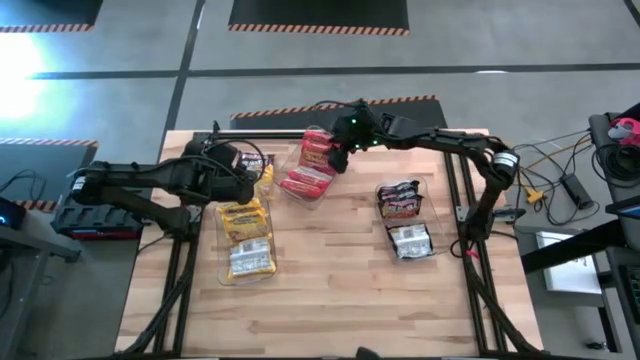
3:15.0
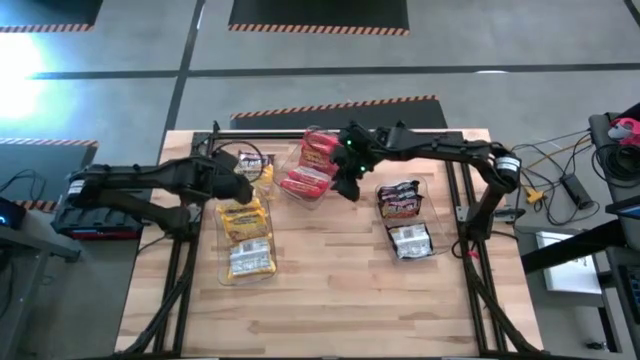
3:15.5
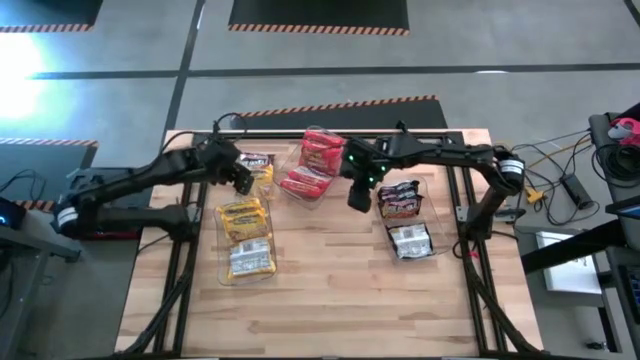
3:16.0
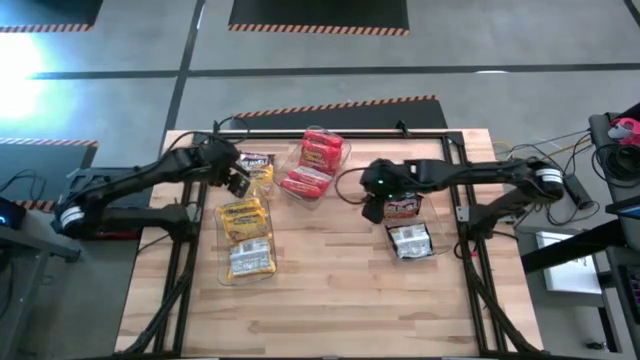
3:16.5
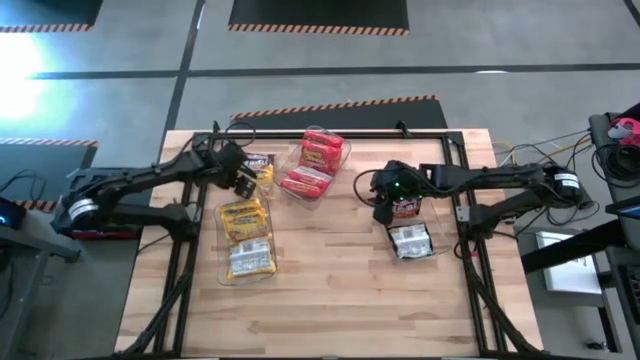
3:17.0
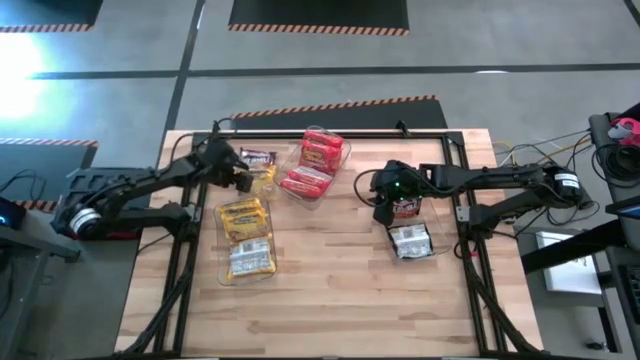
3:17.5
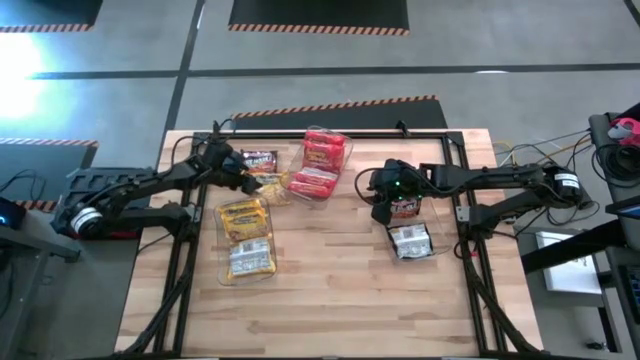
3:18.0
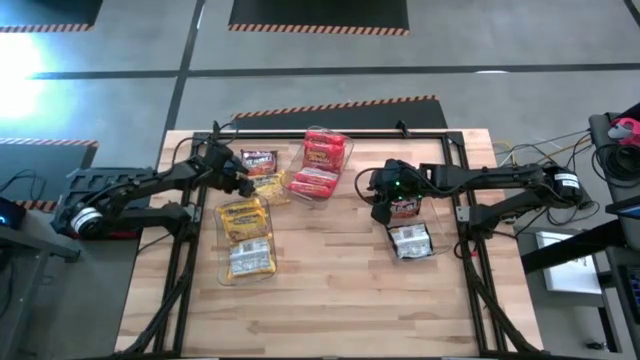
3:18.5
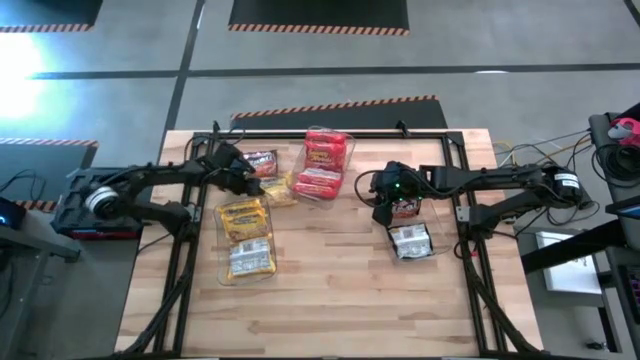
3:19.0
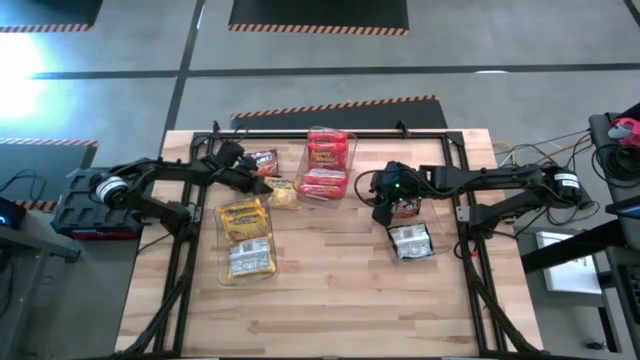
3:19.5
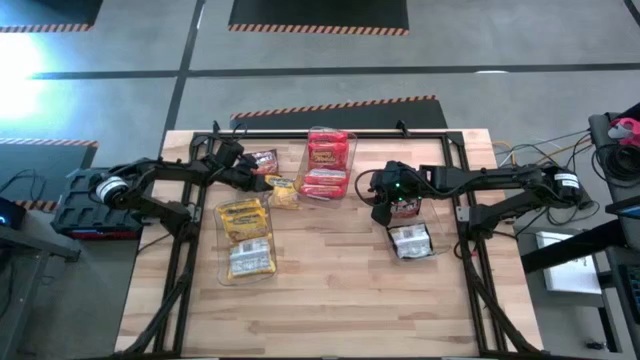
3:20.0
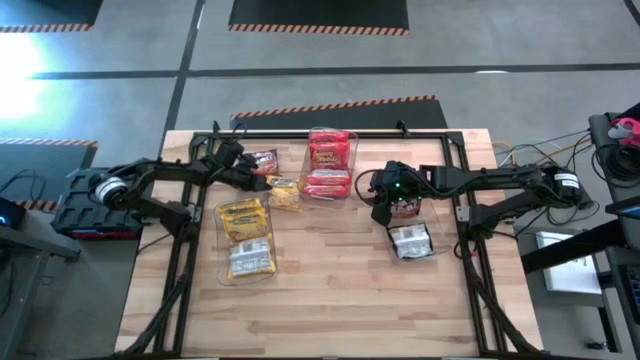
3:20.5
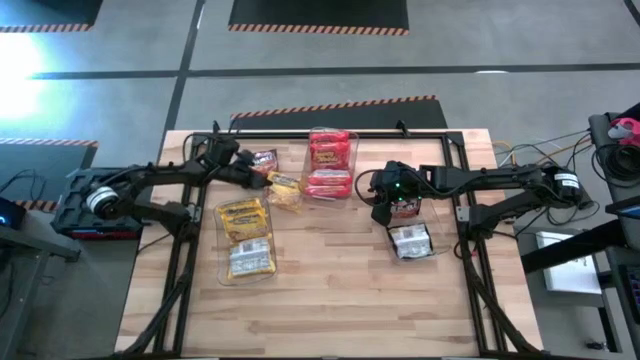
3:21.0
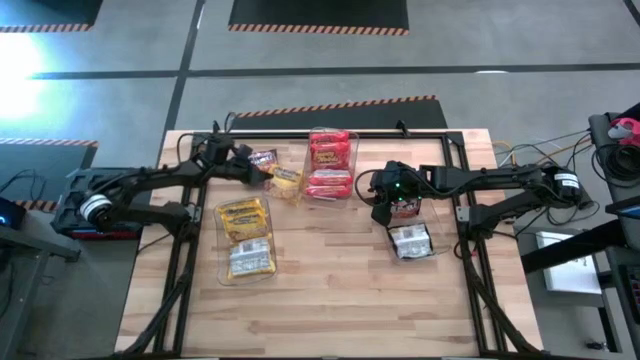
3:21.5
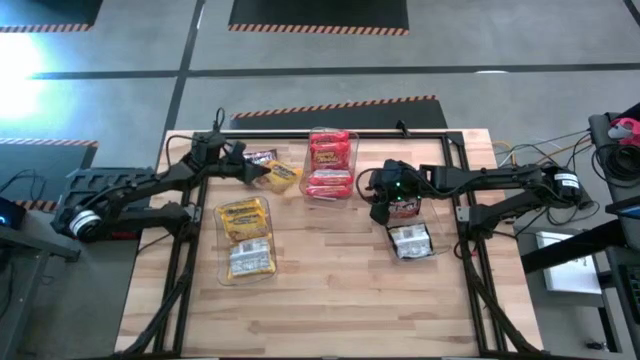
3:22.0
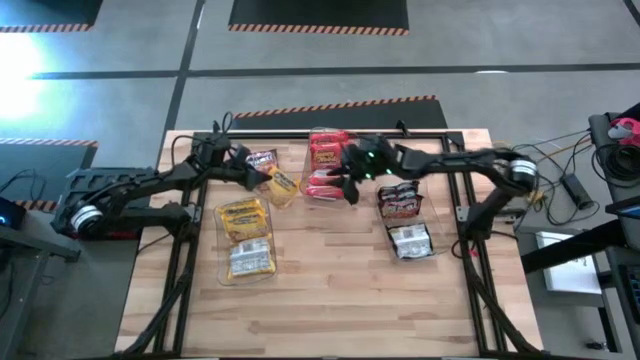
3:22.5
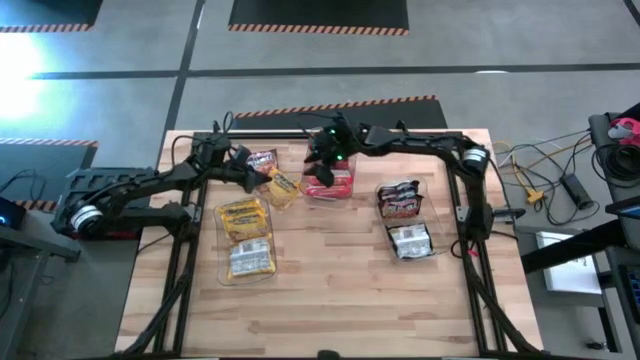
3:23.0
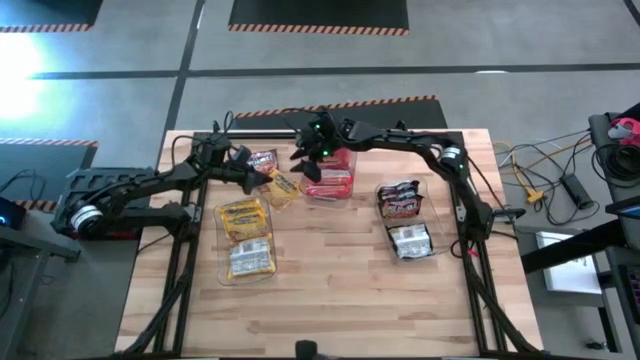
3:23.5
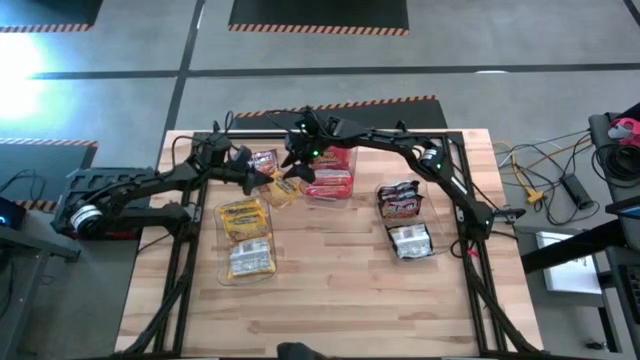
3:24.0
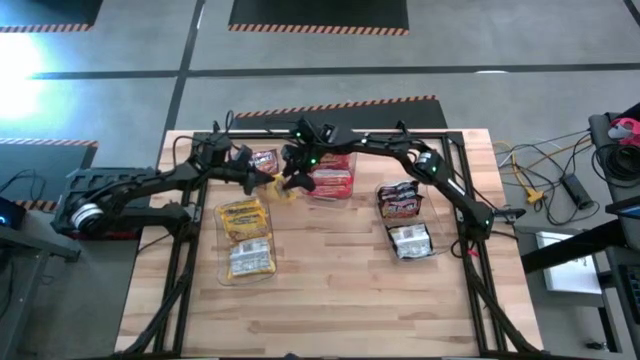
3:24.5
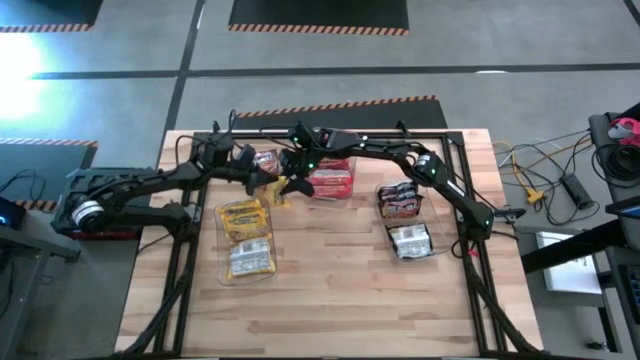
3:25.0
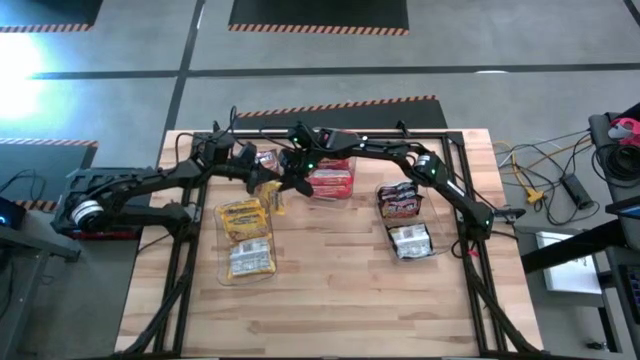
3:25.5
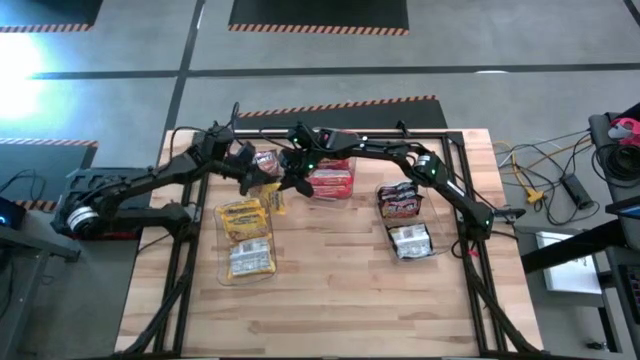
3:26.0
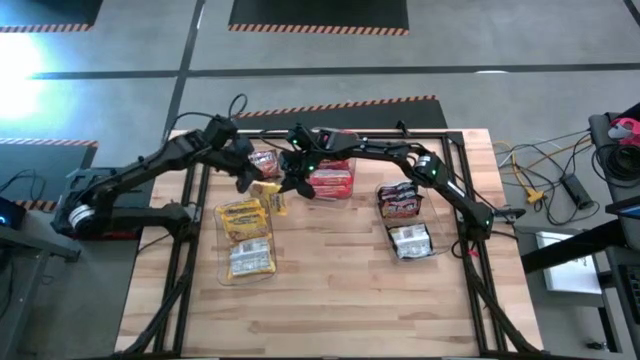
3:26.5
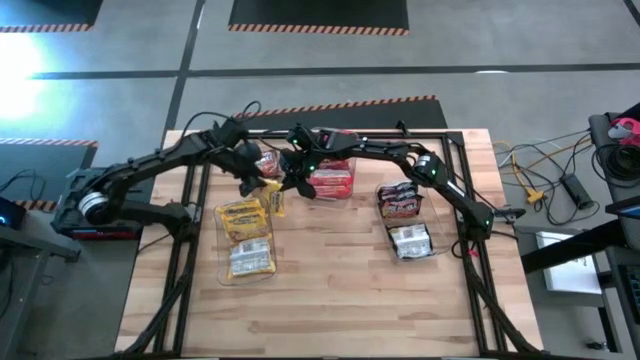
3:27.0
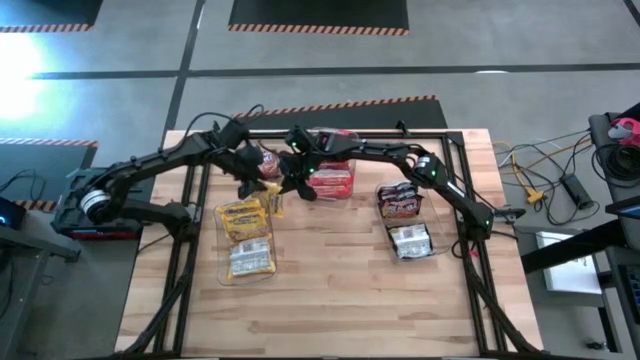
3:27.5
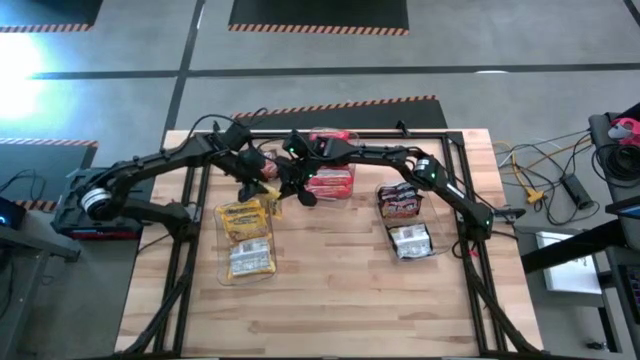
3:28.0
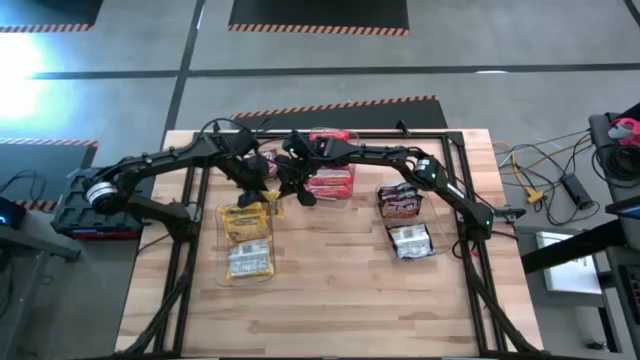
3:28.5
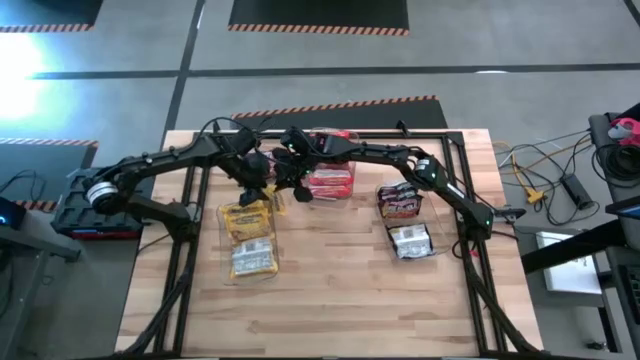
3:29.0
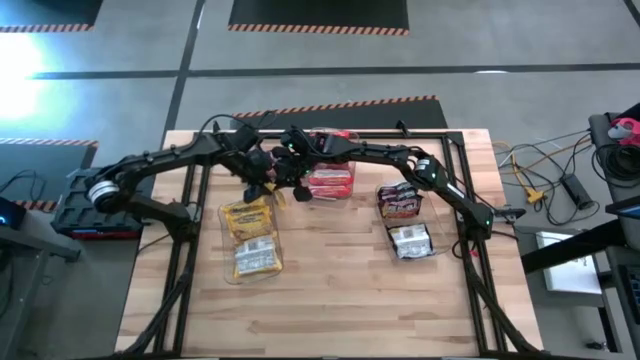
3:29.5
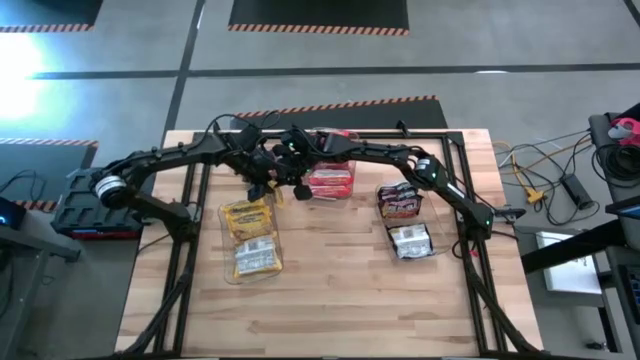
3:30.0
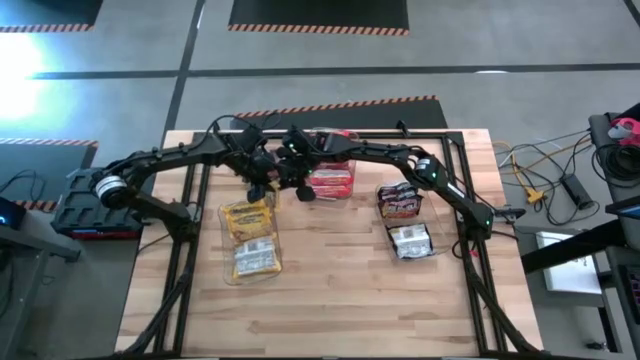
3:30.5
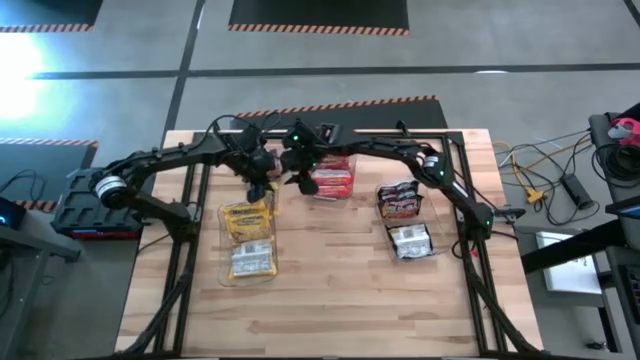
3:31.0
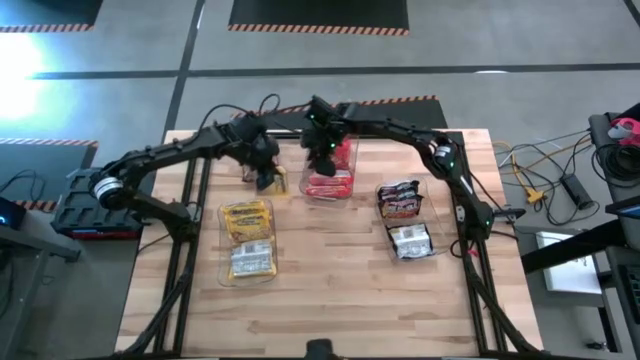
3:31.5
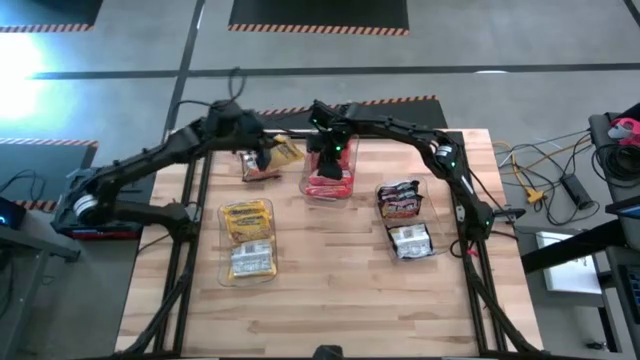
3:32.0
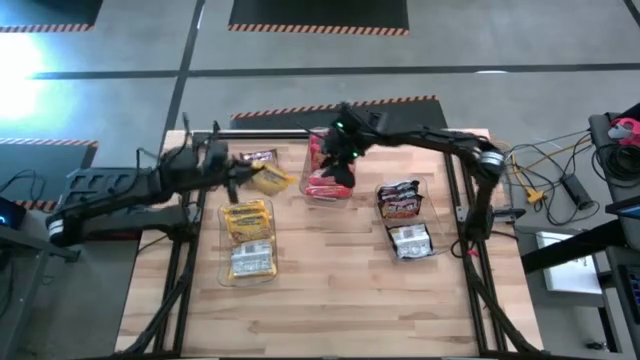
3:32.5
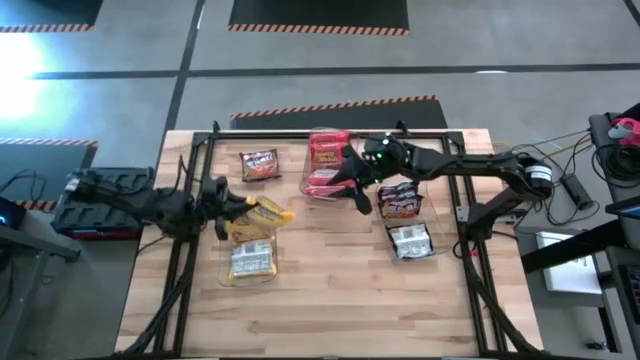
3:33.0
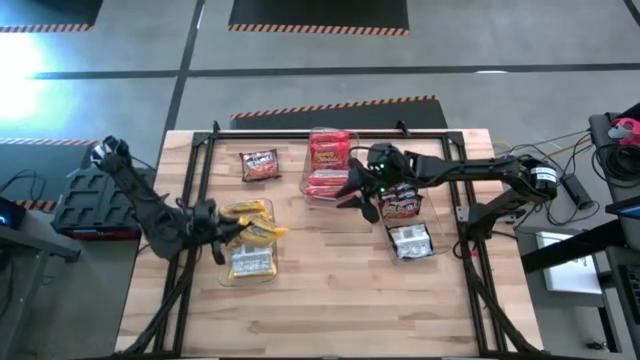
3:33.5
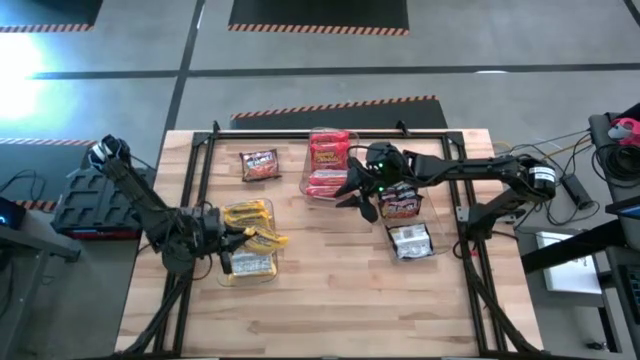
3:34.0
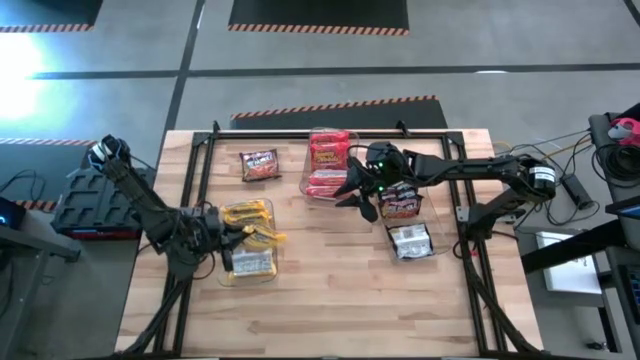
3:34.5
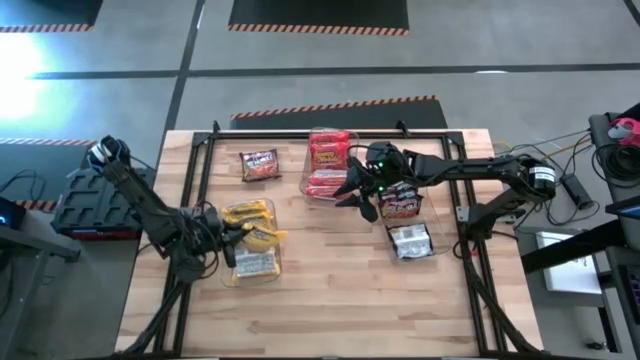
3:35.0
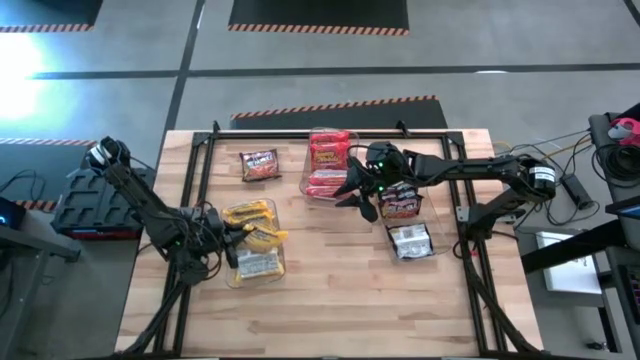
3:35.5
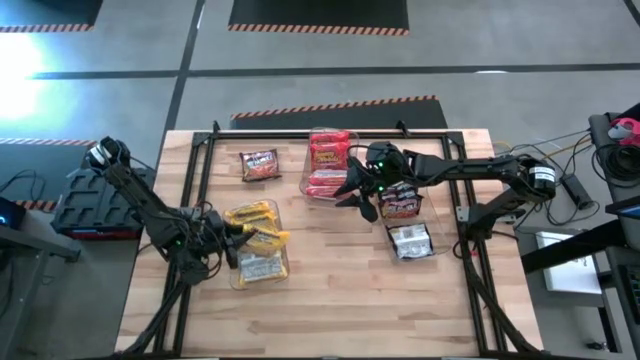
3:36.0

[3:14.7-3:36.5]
Task: Sort Maruchan noodles
Put the yellow pack noodle into the bottom left transparent bin
